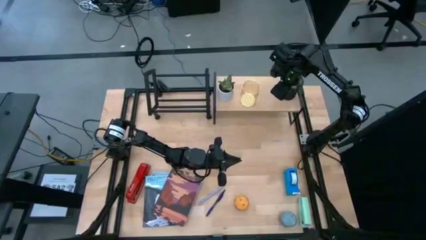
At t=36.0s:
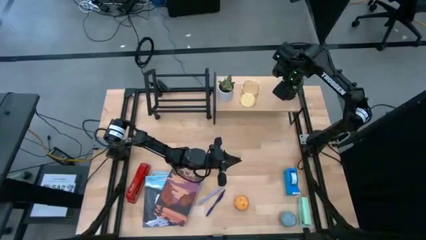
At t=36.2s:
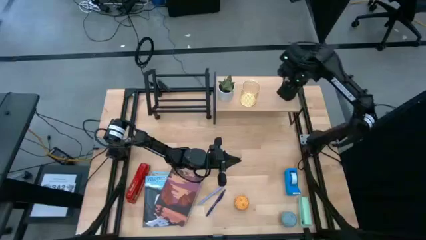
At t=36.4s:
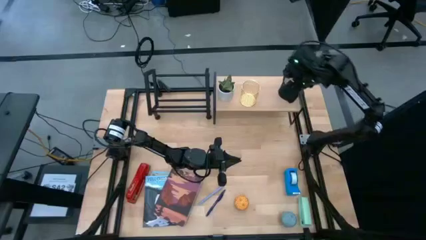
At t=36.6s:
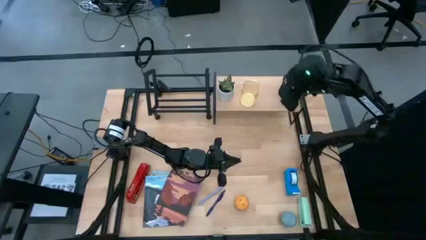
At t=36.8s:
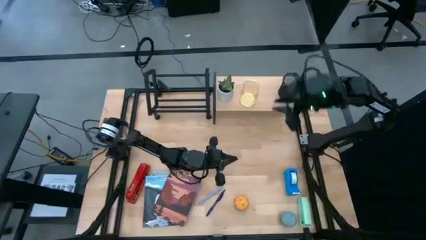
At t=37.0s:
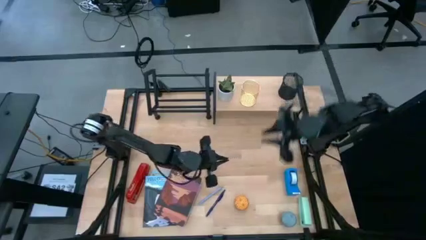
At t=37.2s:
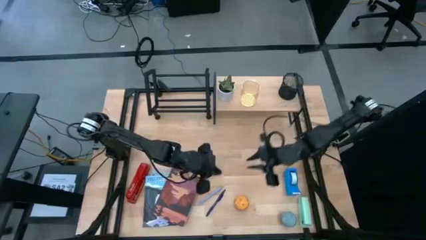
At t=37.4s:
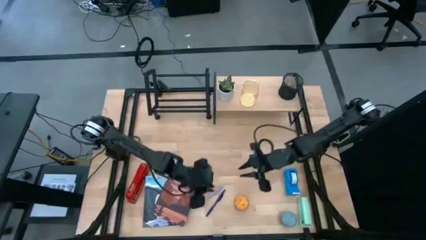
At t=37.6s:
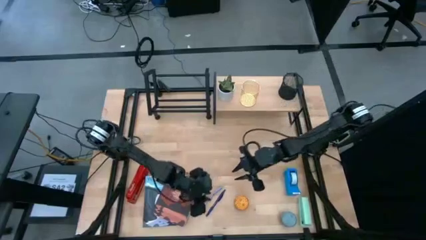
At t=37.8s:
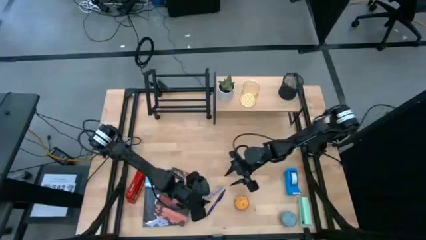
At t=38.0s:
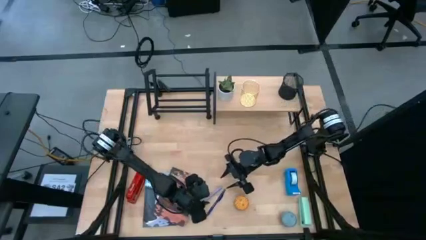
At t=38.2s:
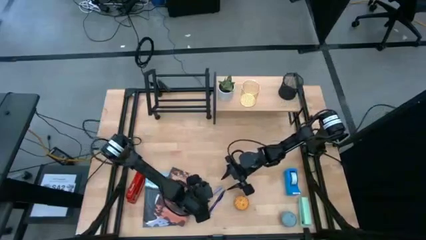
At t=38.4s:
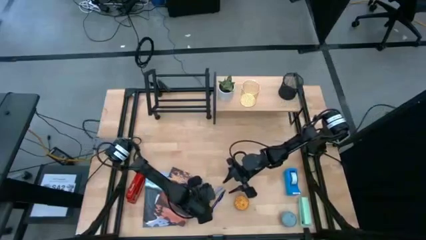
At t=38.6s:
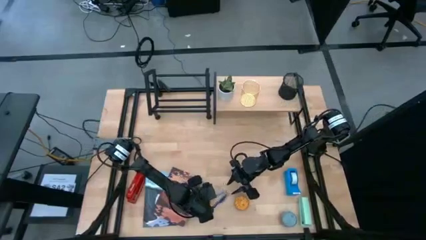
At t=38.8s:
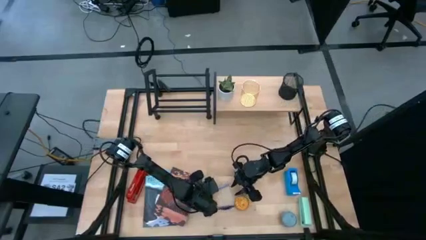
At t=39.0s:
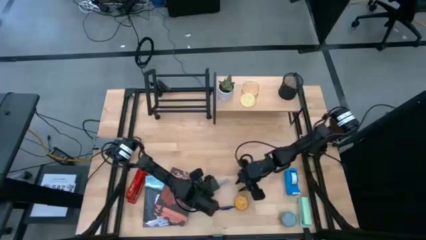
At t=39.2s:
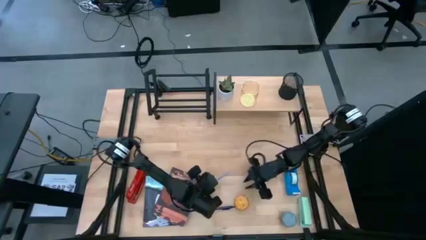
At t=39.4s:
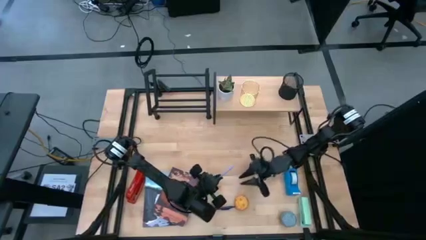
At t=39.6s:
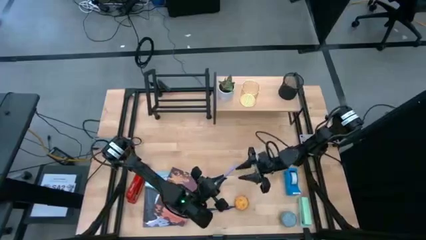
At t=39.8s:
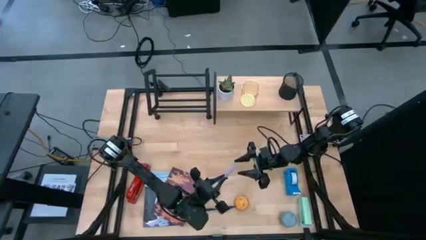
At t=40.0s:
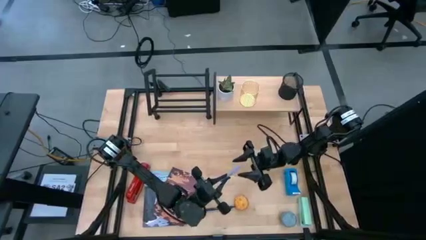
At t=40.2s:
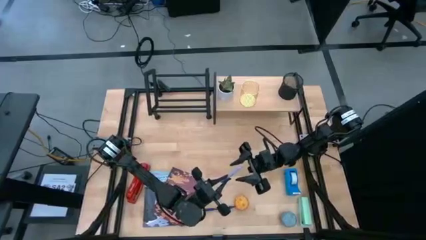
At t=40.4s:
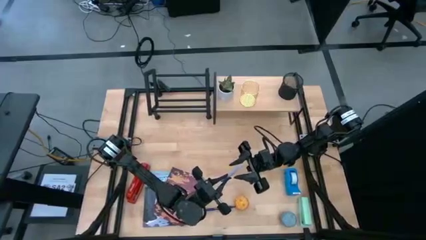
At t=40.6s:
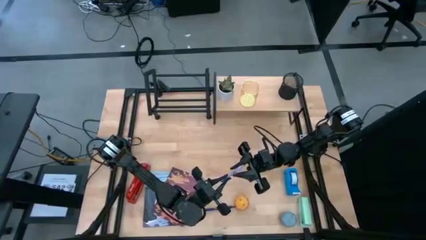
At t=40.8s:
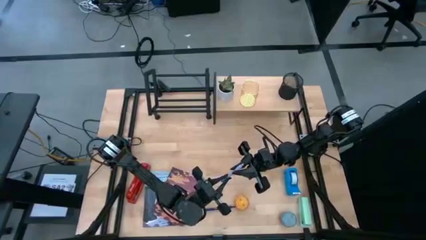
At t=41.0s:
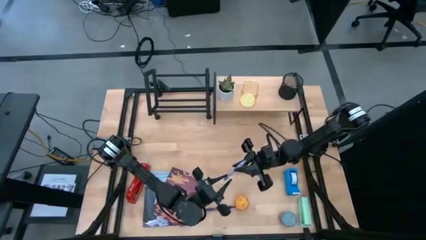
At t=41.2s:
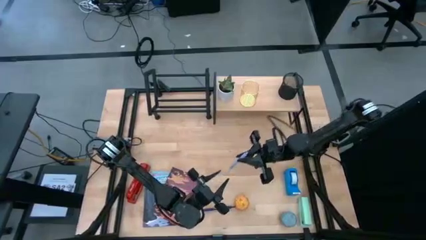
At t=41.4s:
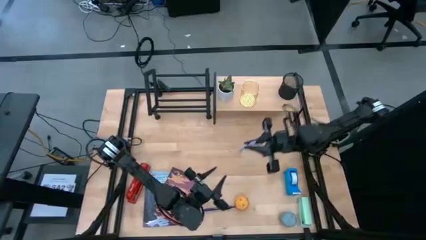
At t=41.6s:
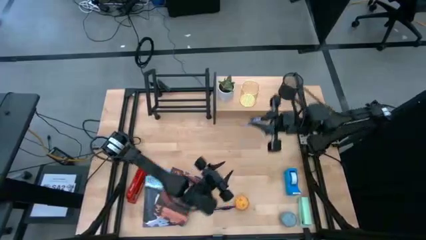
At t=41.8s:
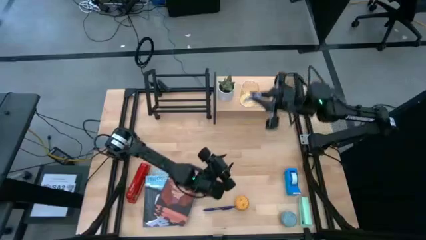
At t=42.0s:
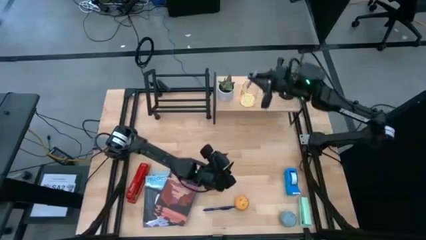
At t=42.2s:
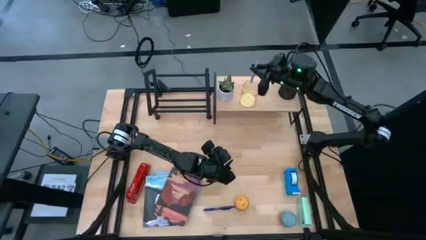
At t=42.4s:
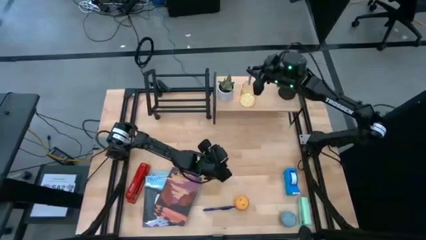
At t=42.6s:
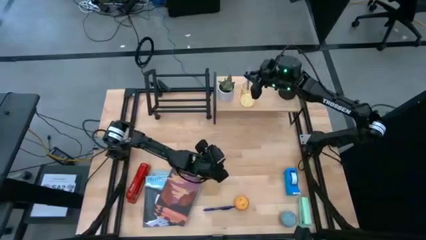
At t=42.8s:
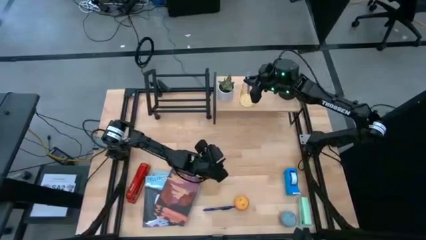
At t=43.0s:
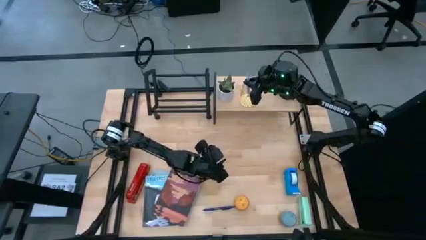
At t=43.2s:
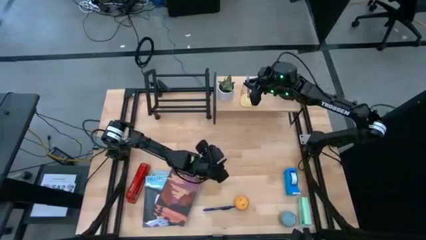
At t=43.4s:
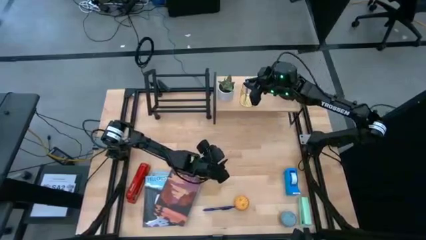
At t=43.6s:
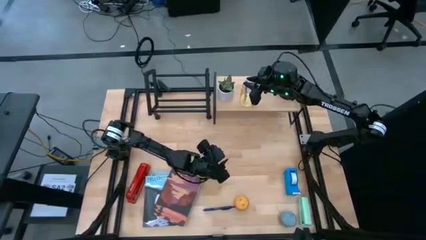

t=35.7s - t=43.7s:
Task: Stock shelves
Put the purple pen into the yellow pen organizer on the shelf

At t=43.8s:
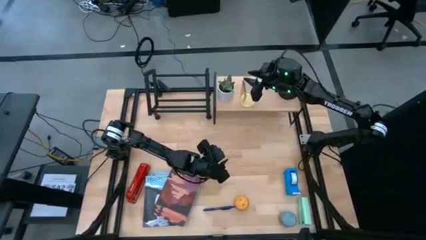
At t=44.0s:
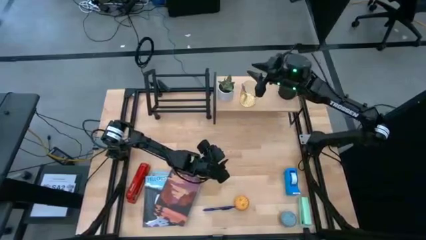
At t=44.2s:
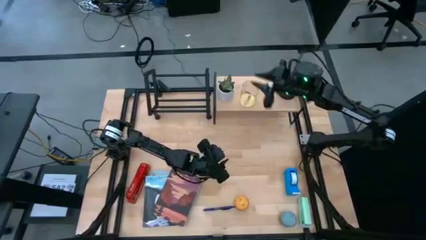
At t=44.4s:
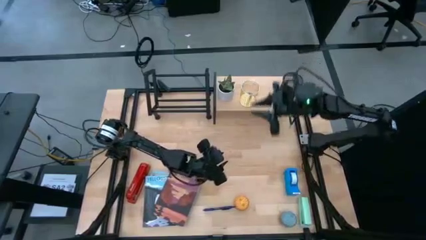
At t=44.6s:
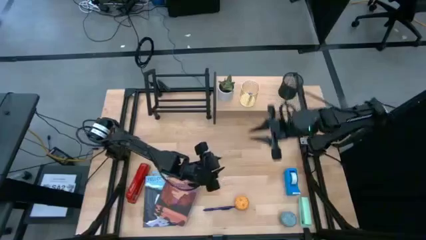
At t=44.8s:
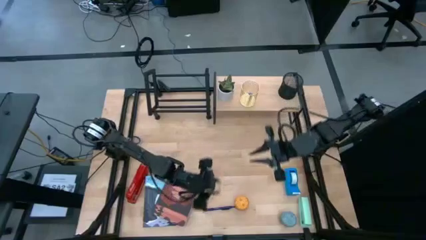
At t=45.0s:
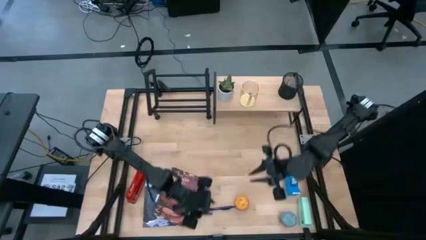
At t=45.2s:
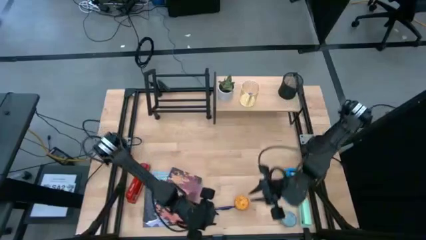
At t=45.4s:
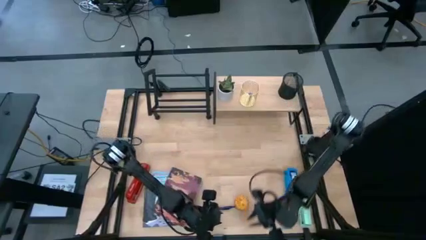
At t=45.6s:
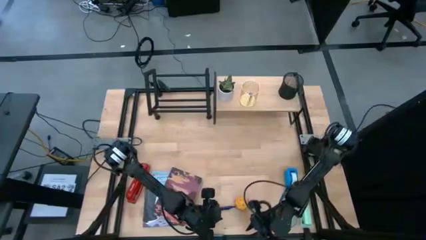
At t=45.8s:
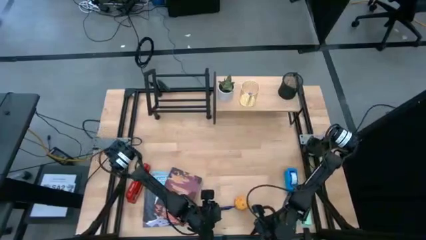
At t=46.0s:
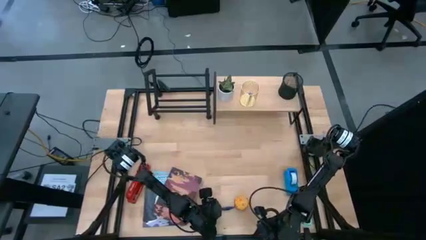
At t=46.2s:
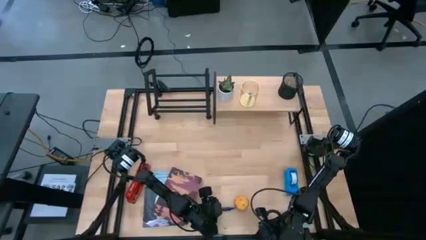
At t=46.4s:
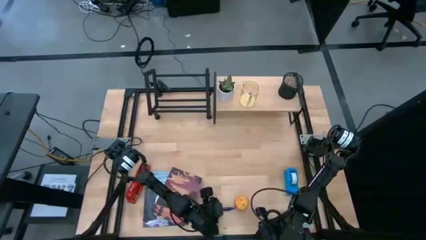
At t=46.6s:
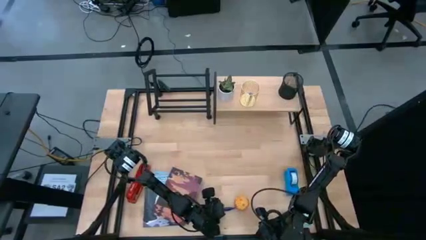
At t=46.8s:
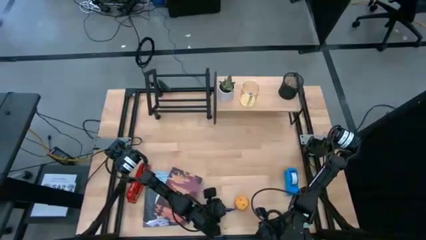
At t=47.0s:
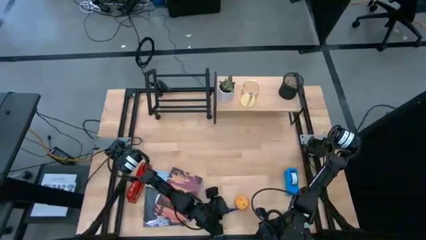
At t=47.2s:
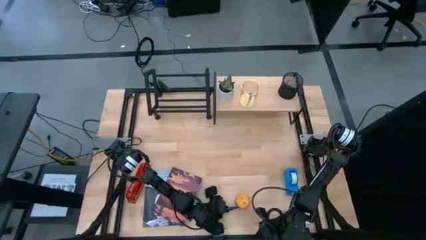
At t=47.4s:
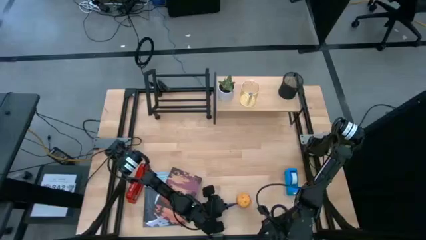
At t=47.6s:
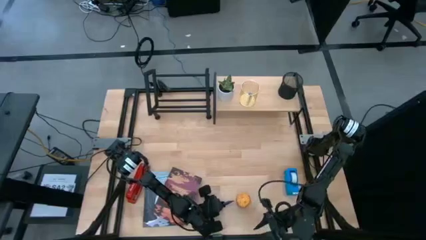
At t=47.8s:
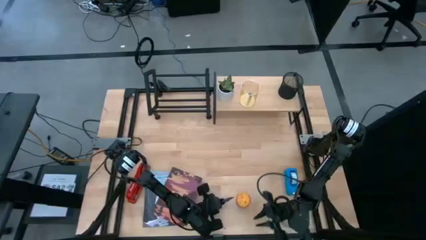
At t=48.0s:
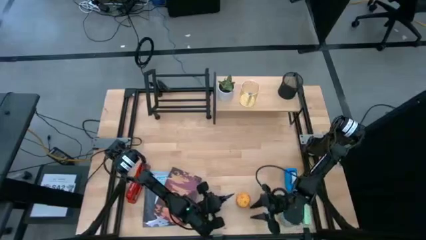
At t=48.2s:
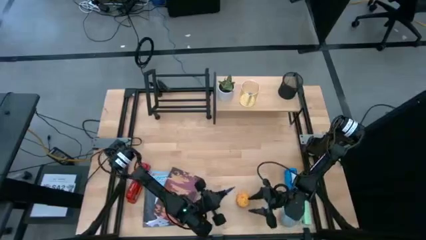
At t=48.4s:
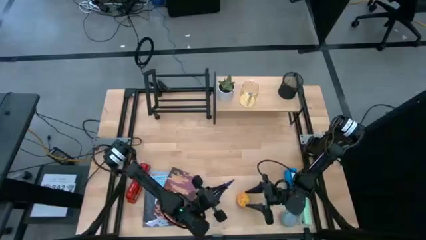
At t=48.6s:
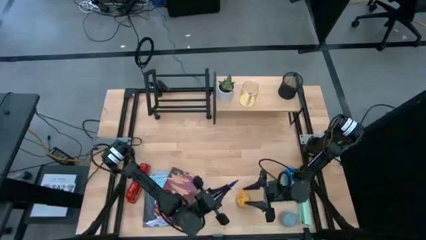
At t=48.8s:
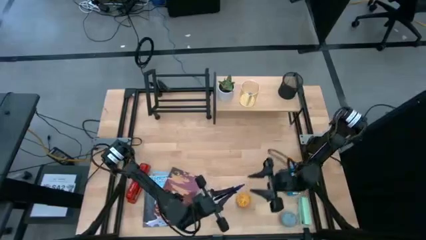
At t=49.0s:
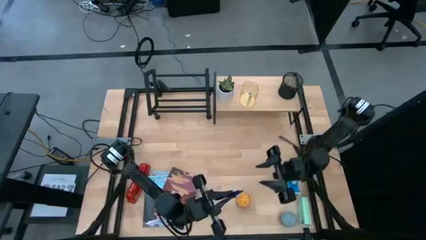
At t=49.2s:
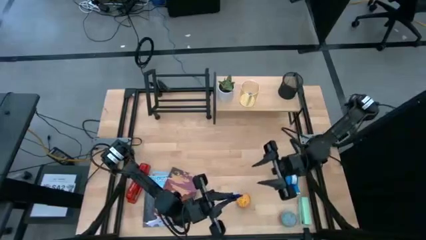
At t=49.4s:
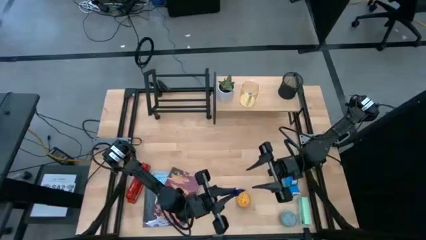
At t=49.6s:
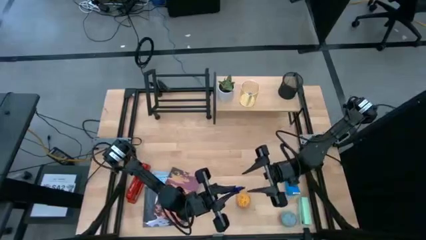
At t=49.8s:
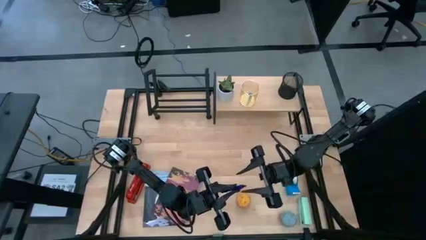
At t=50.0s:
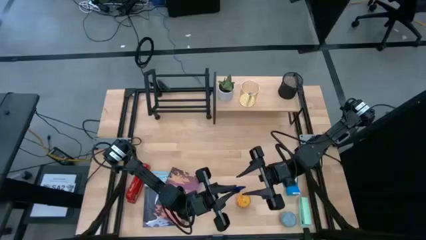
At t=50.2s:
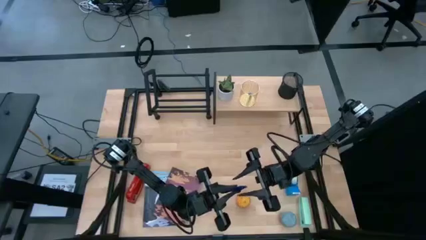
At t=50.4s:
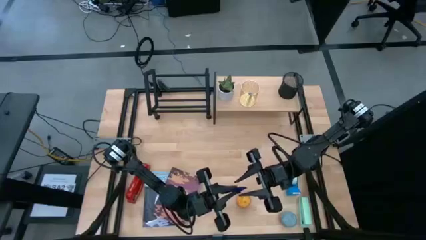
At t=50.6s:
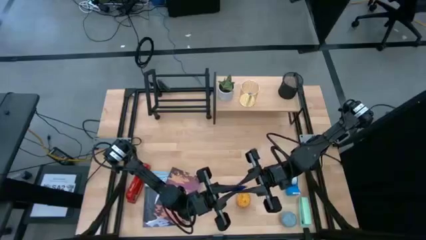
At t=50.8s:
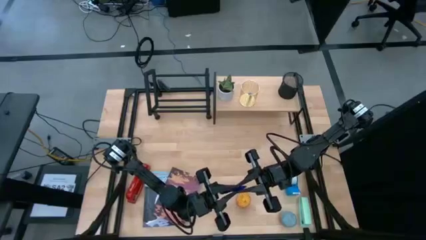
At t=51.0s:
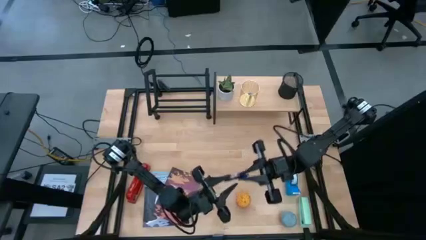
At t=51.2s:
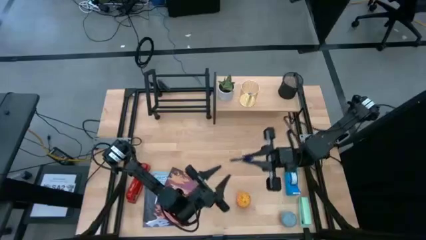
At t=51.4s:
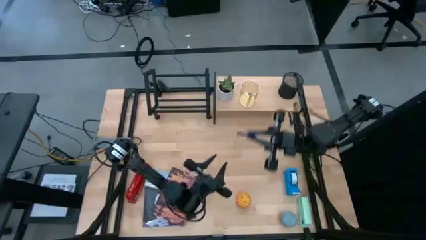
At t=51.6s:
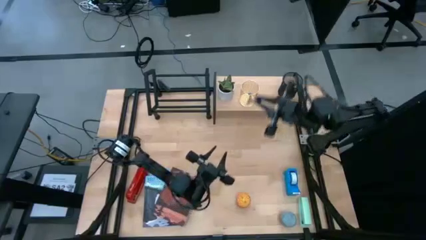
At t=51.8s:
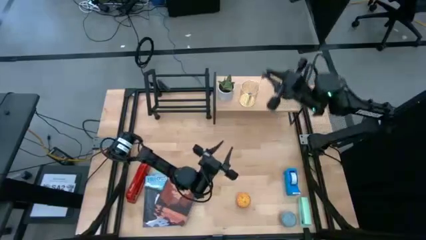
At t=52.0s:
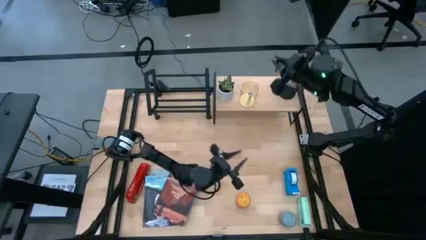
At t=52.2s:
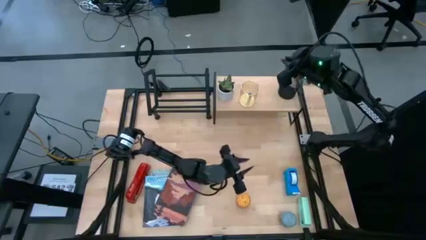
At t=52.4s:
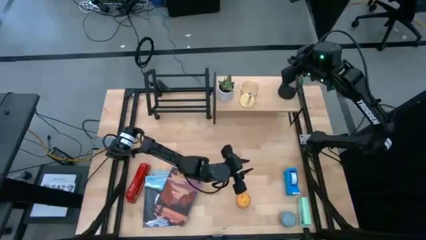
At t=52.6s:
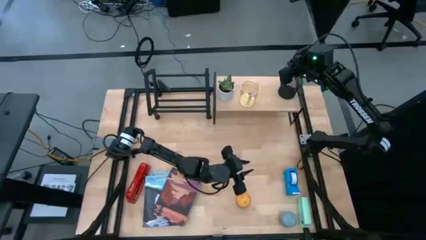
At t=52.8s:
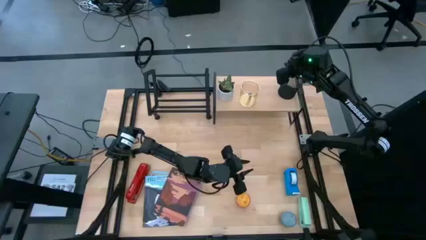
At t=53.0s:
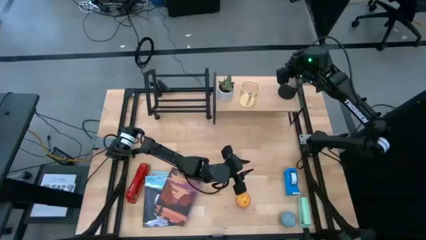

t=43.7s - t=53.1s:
Put the blue pen into the black pen organizer on the shelf
